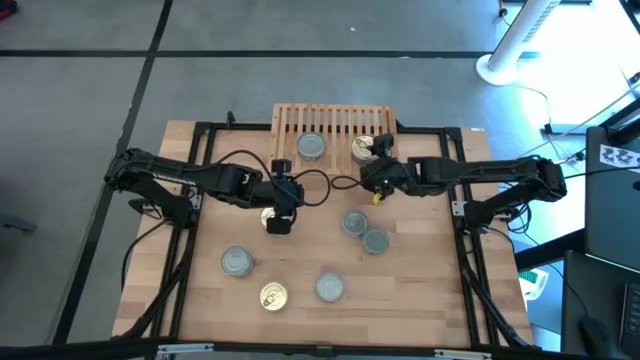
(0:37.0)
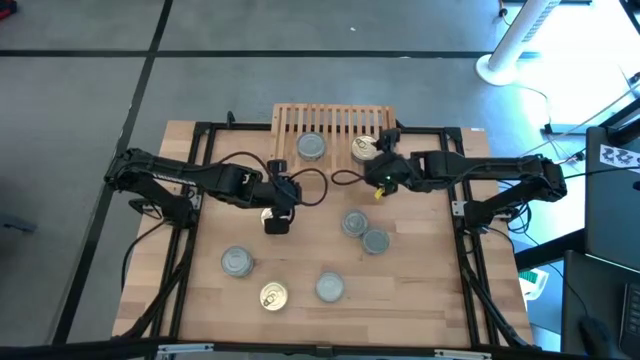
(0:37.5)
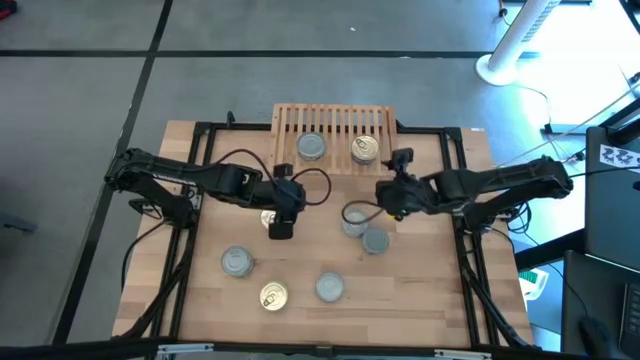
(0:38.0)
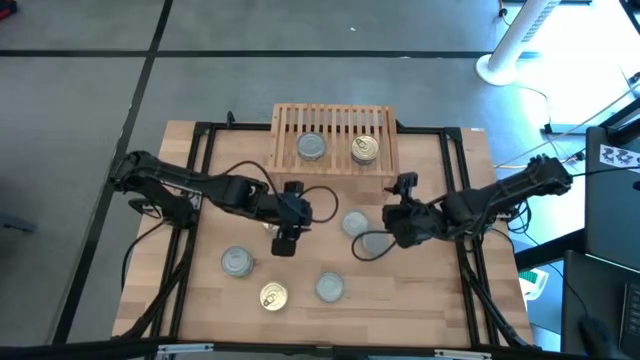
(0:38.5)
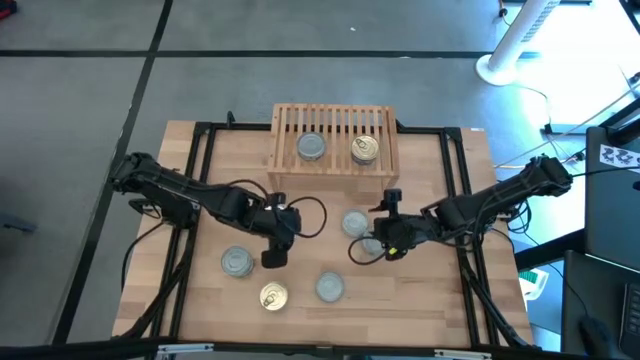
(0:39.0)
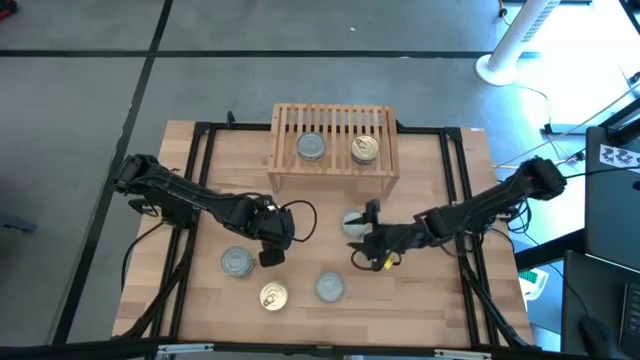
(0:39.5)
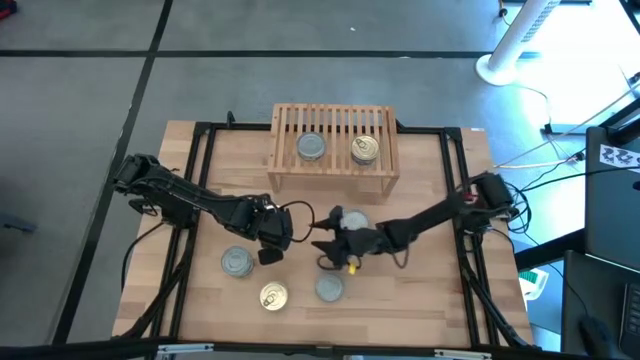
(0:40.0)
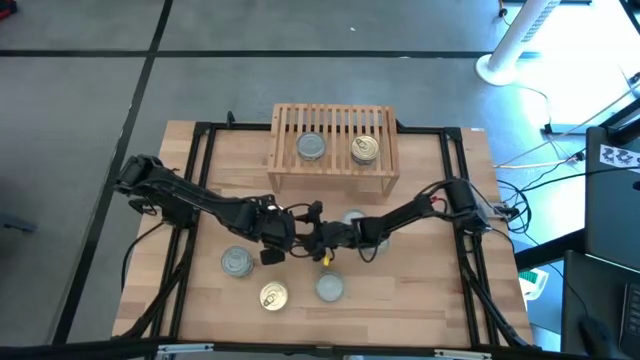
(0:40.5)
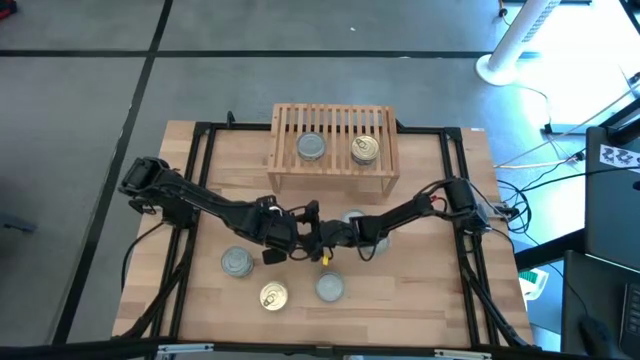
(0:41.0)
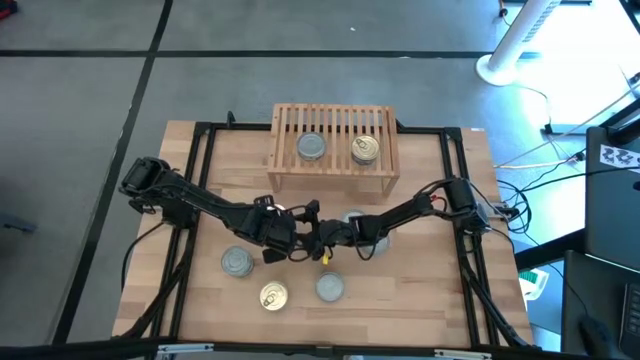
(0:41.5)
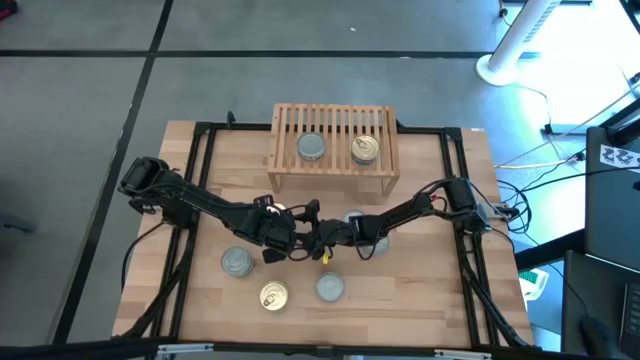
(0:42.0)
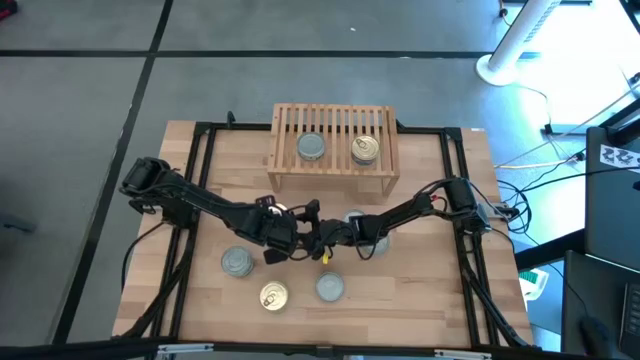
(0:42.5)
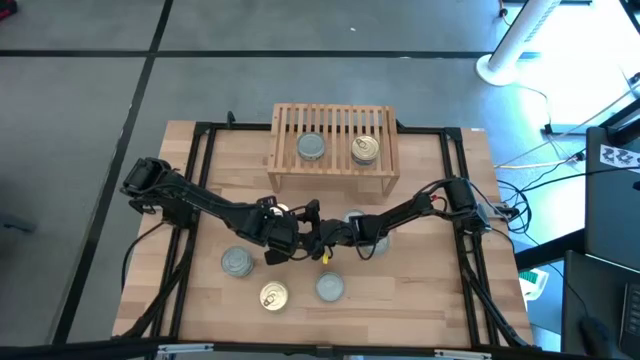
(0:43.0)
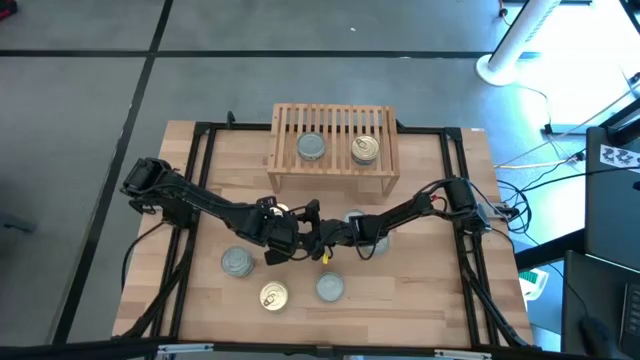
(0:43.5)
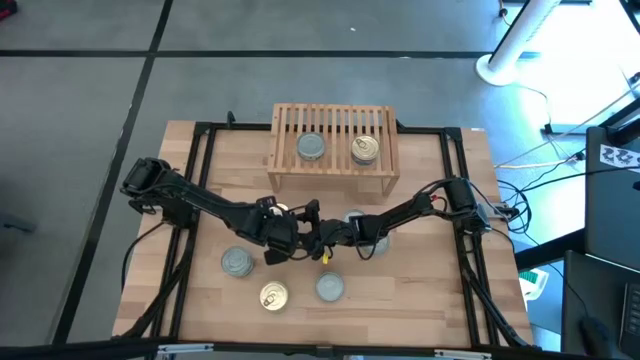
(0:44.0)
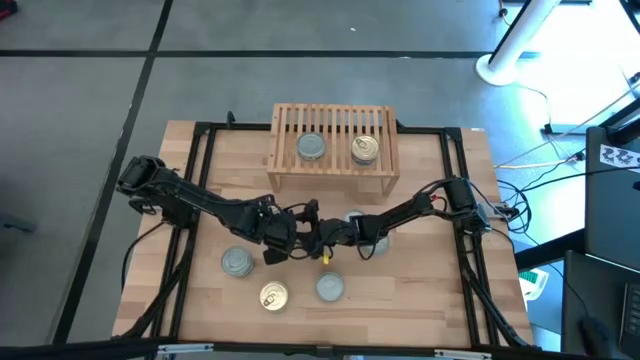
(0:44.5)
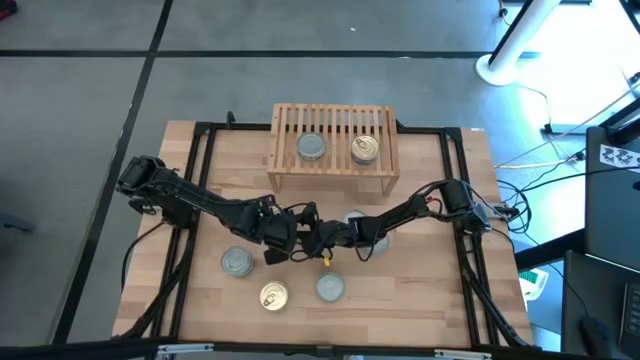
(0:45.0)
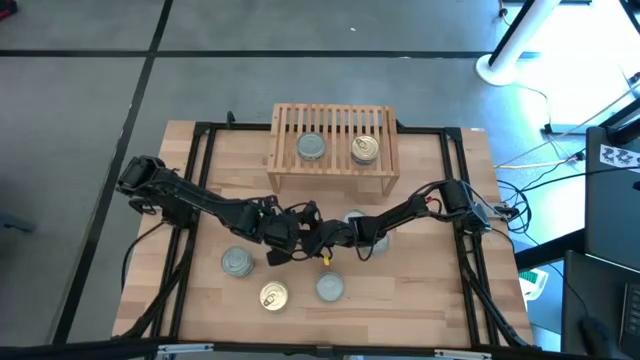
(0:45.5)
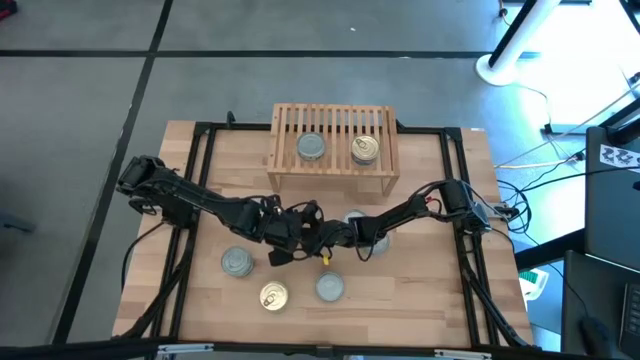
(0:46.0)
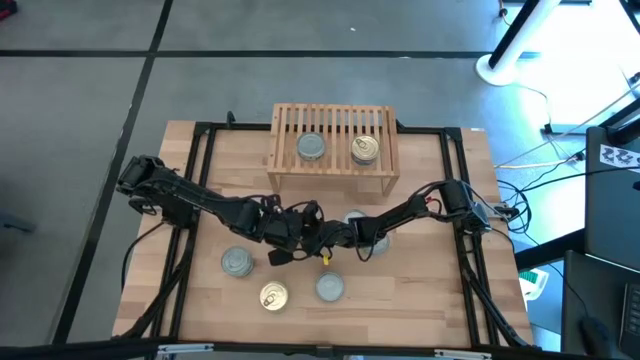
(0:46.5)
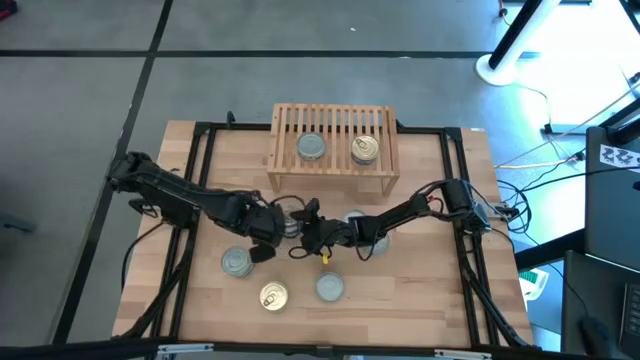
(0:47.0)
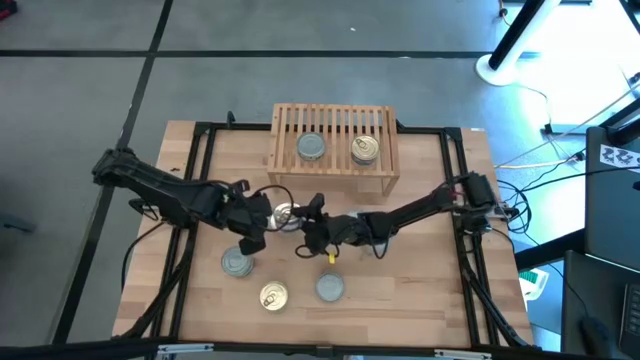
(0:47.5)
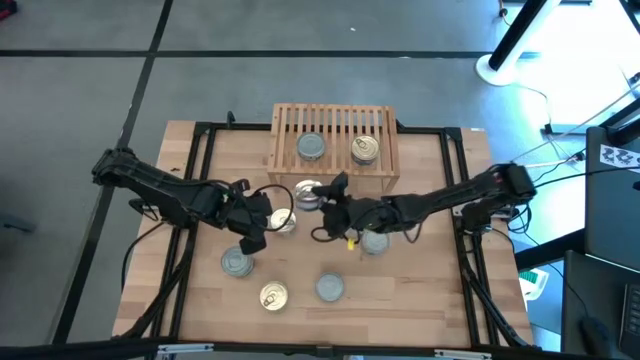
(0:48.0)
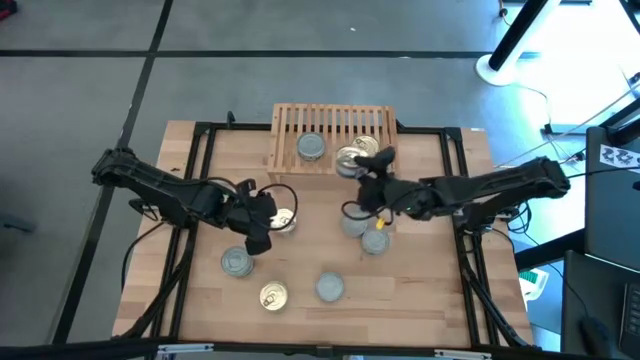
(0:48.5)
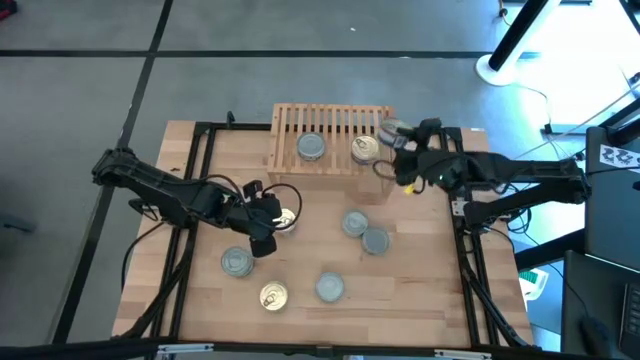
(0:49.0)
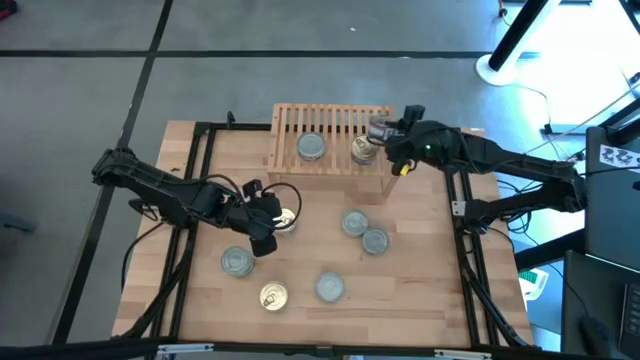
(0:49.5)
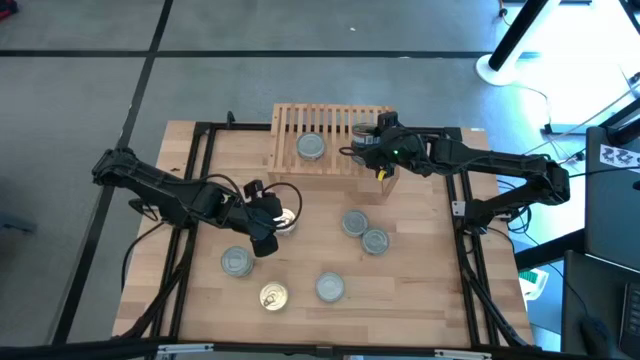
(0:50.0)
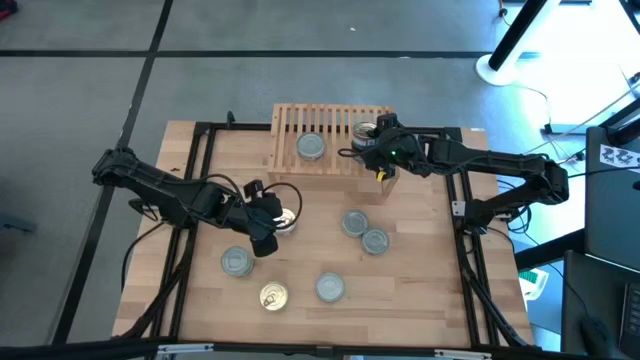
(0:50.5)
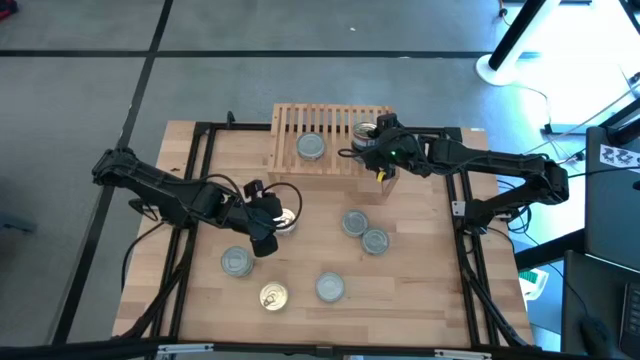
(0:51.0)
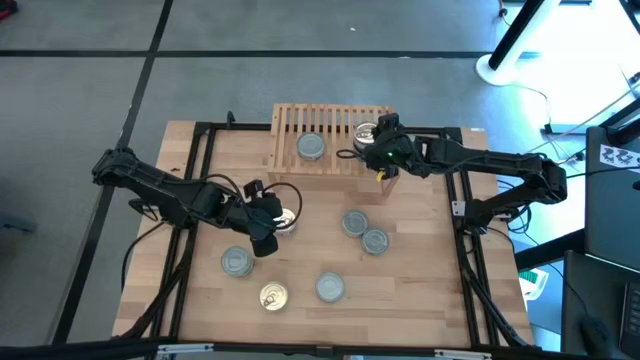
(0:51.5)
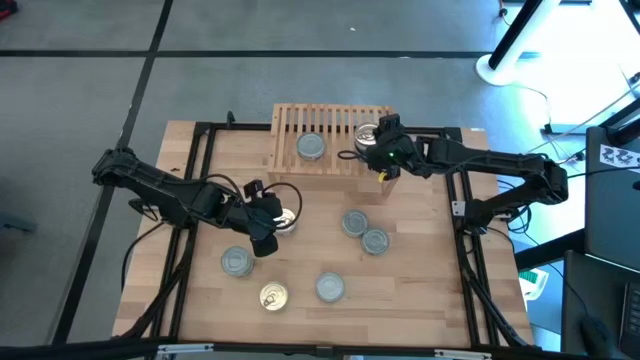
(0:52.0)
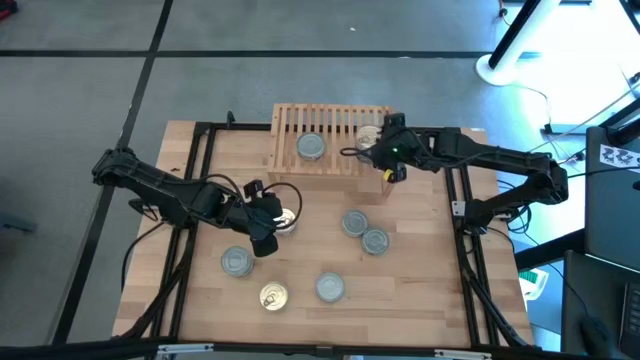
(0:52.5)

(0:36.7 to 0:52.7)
Task: Stack canned seafood by type on shelf
Stack the blue pink tuna can on top of the blue pink tuna can on the shelf
